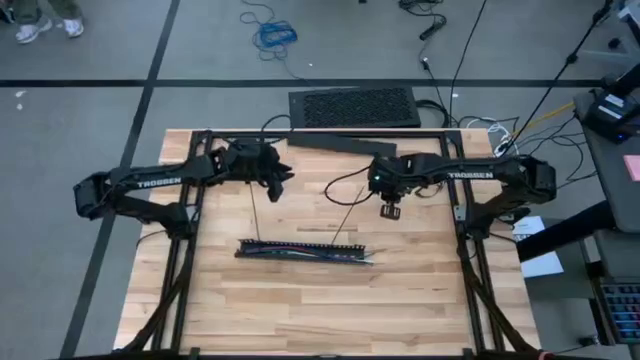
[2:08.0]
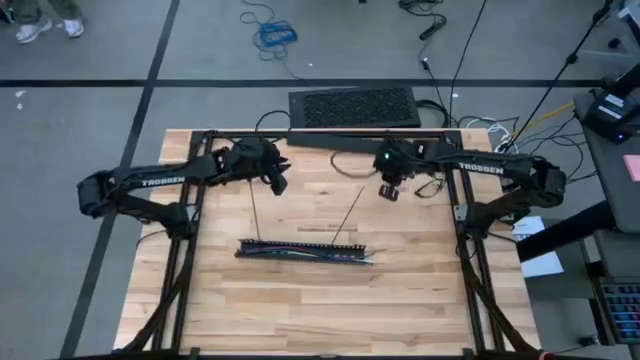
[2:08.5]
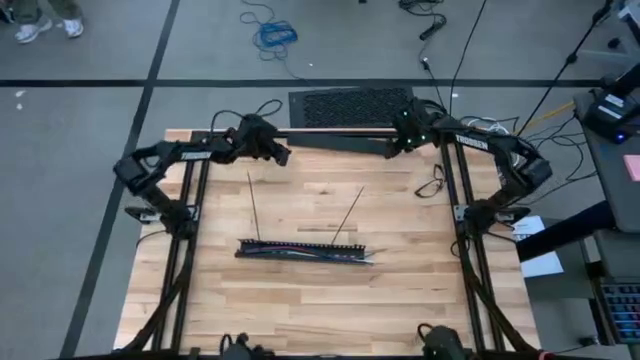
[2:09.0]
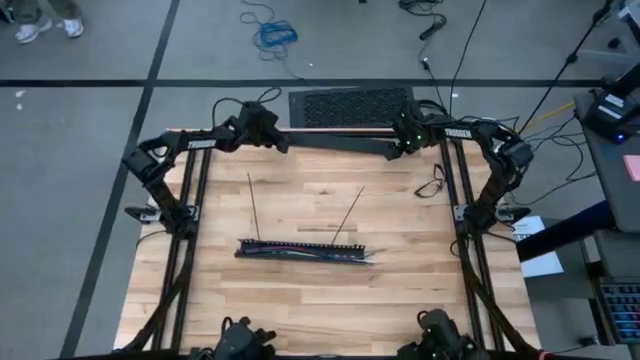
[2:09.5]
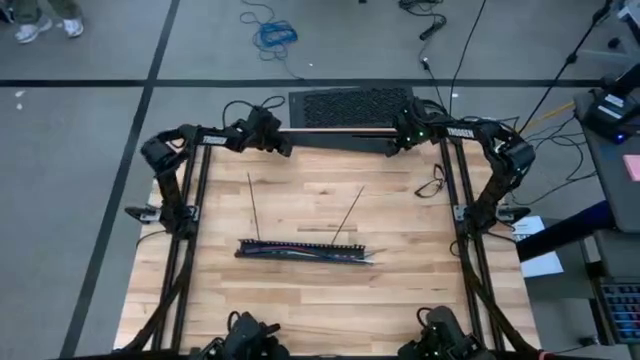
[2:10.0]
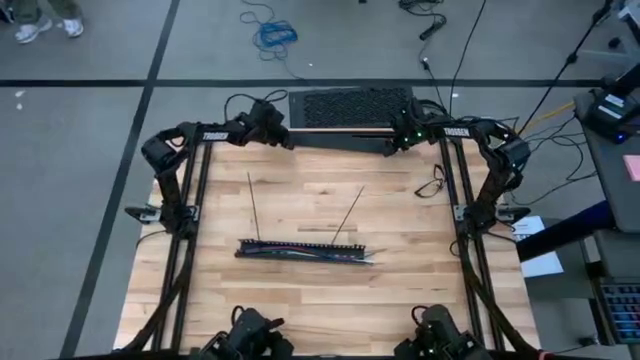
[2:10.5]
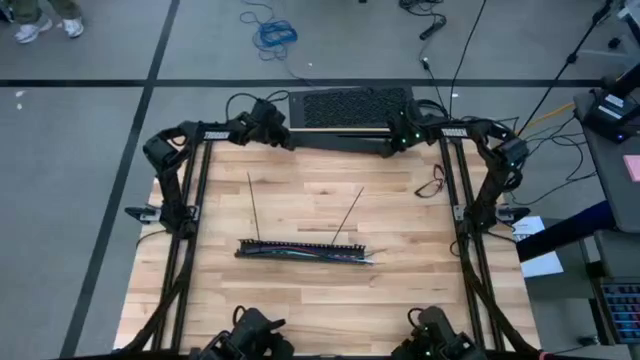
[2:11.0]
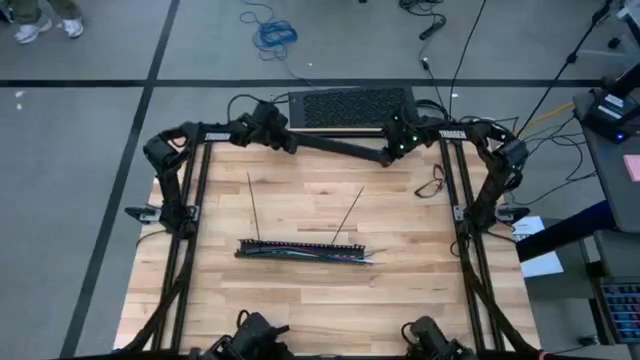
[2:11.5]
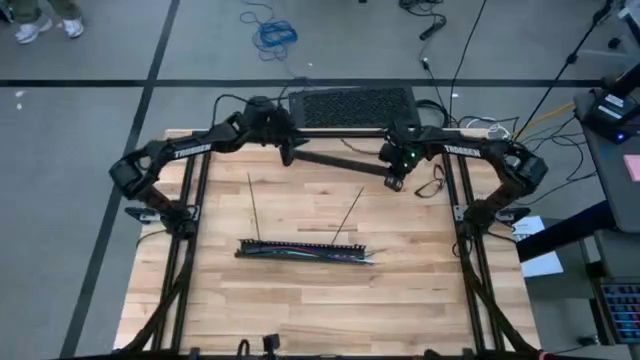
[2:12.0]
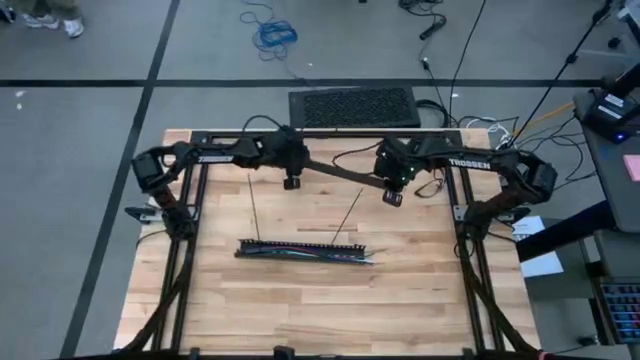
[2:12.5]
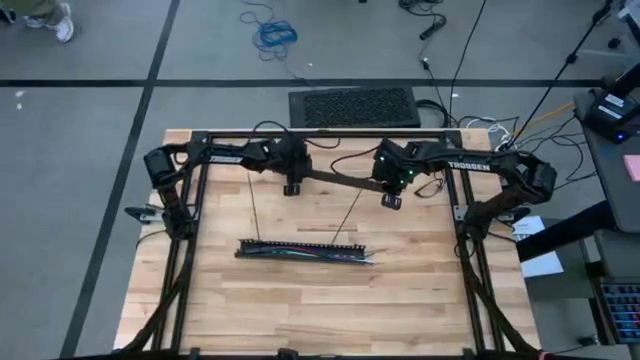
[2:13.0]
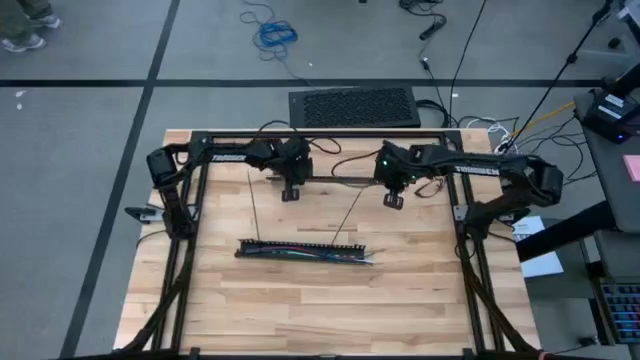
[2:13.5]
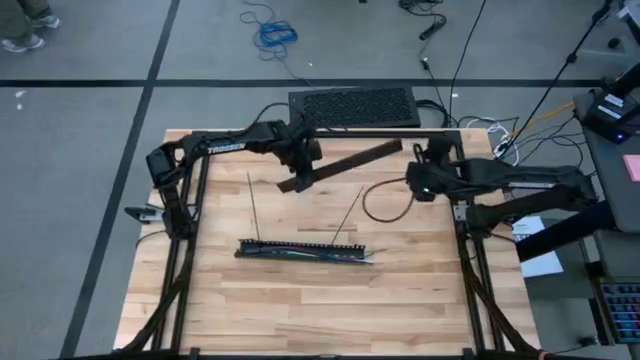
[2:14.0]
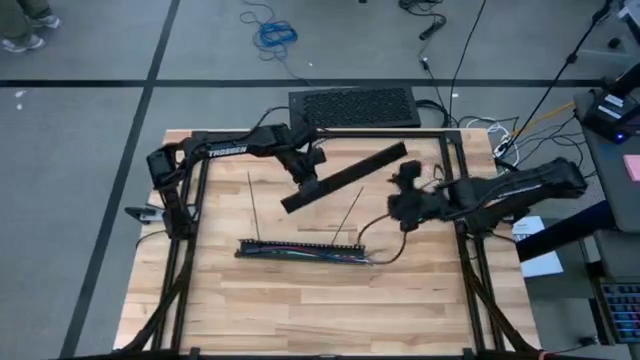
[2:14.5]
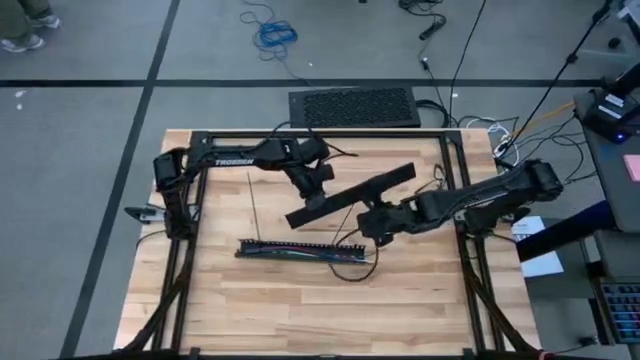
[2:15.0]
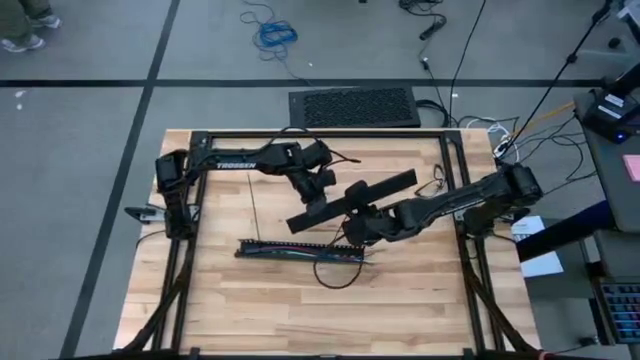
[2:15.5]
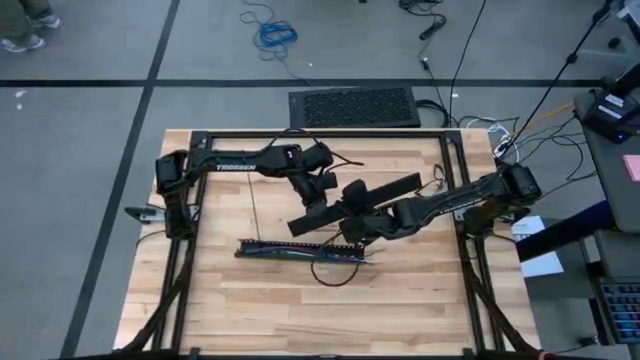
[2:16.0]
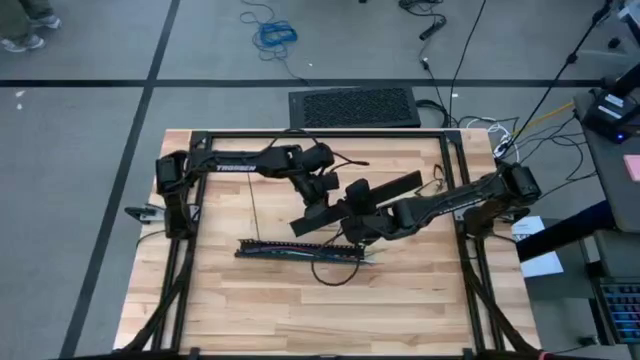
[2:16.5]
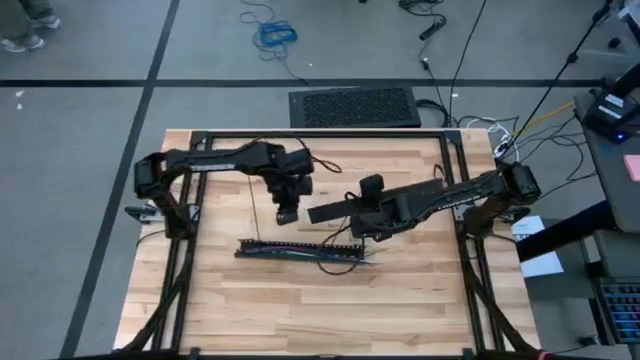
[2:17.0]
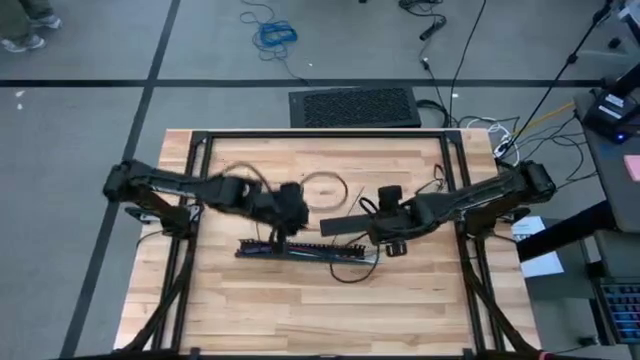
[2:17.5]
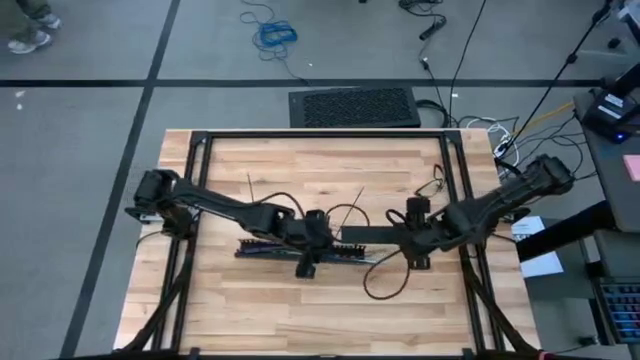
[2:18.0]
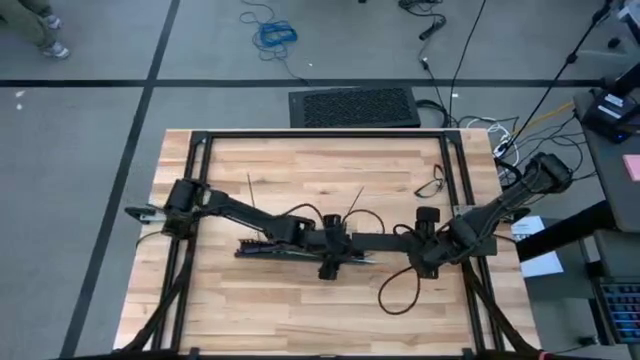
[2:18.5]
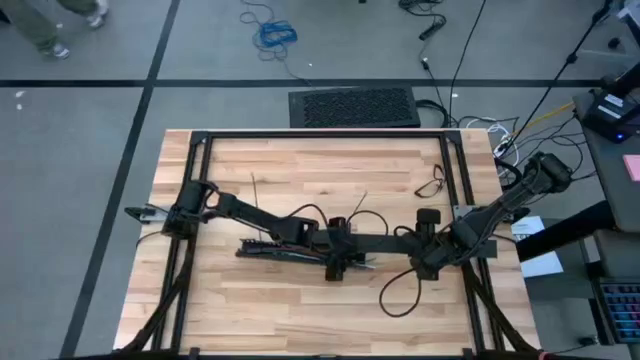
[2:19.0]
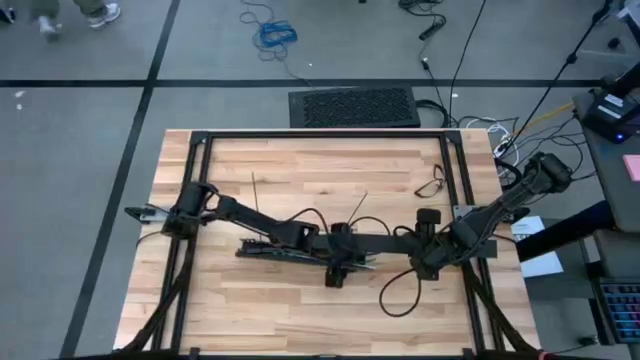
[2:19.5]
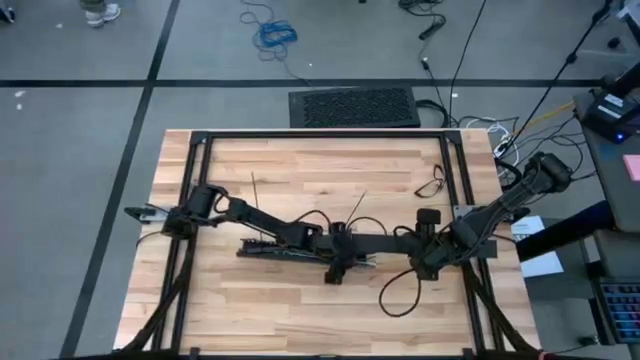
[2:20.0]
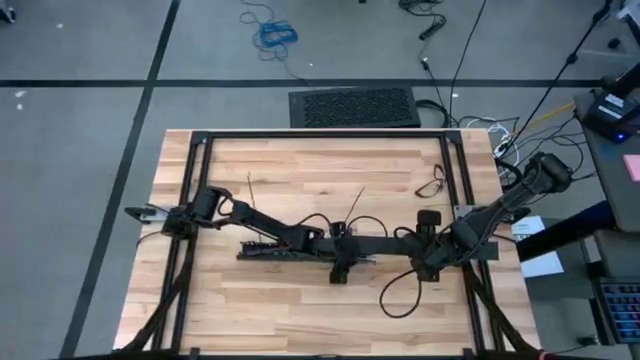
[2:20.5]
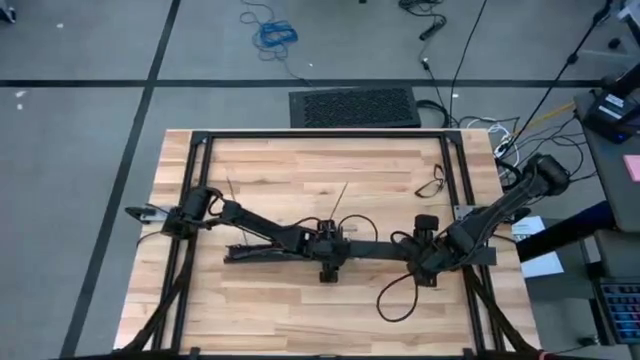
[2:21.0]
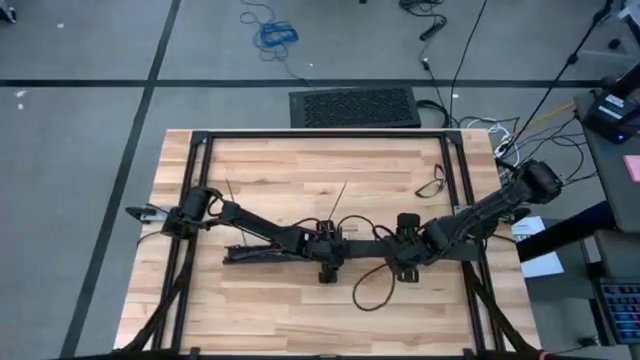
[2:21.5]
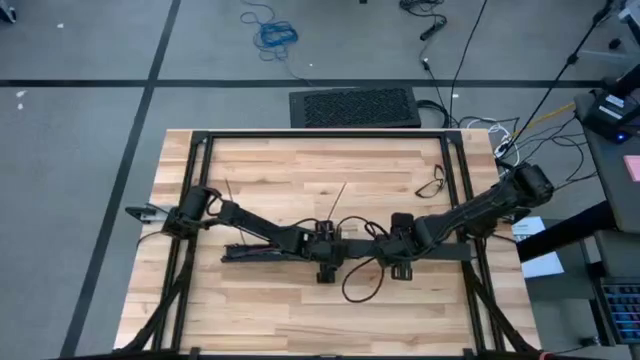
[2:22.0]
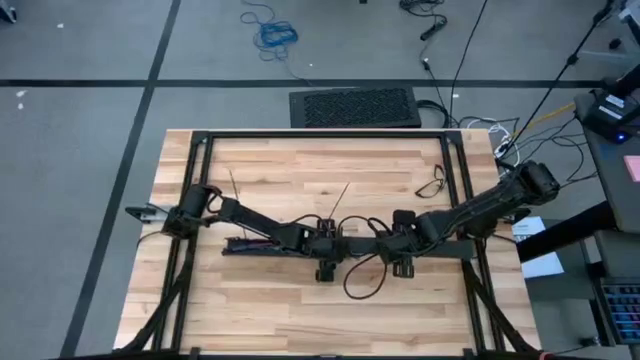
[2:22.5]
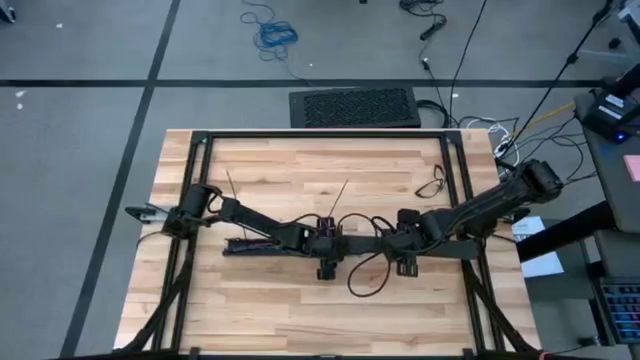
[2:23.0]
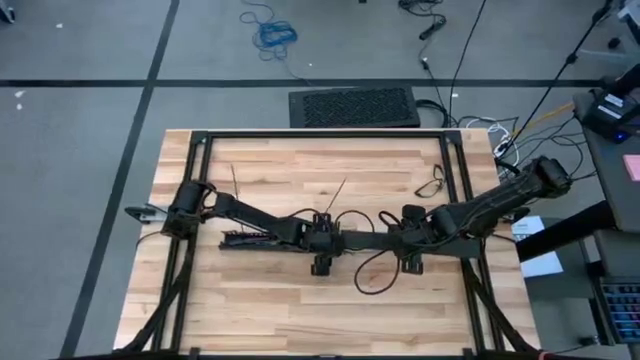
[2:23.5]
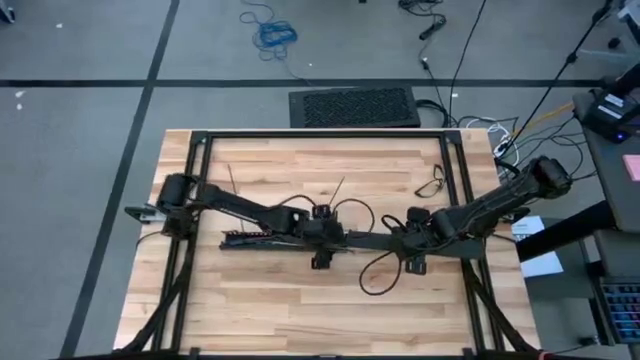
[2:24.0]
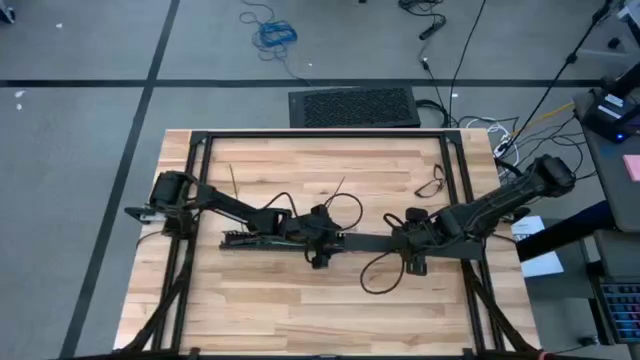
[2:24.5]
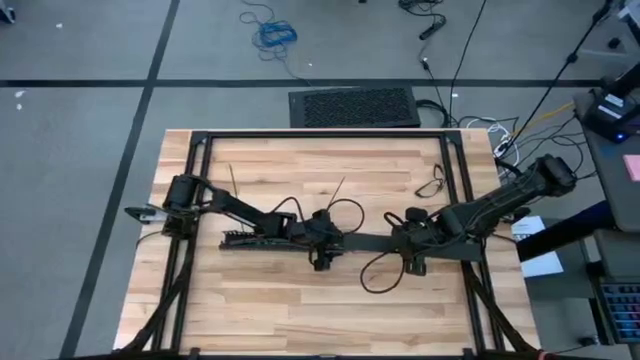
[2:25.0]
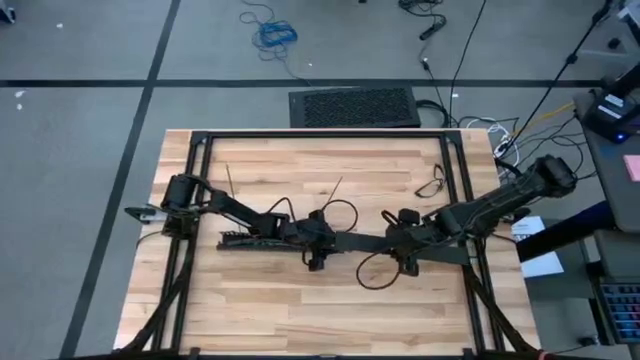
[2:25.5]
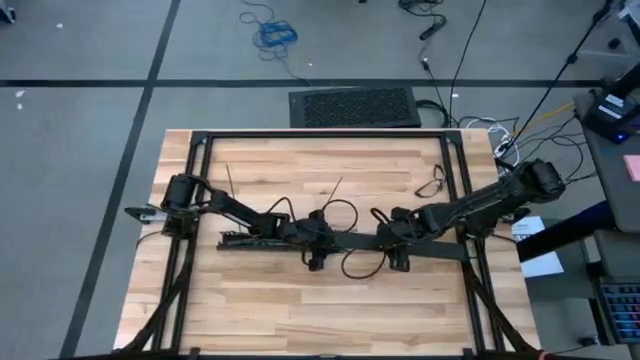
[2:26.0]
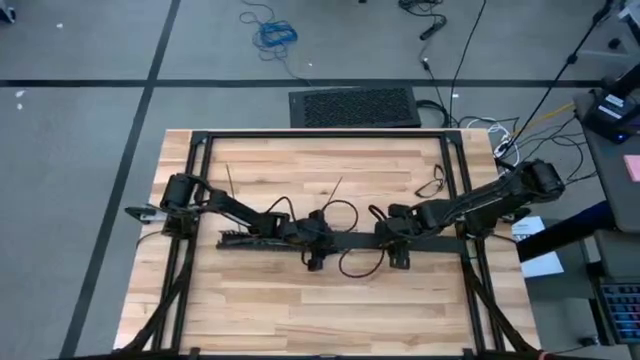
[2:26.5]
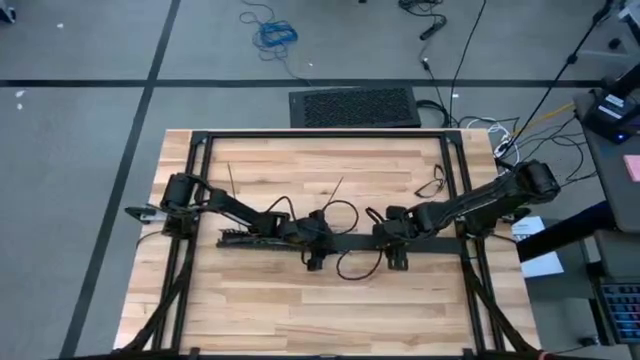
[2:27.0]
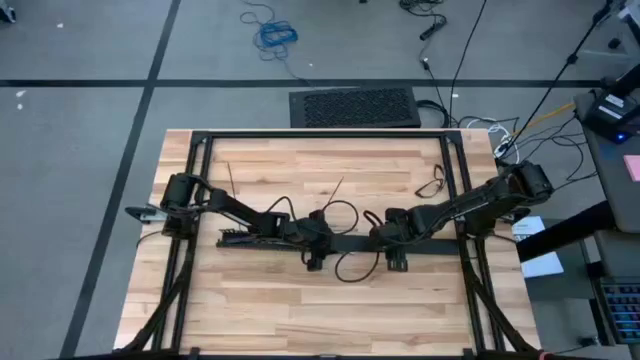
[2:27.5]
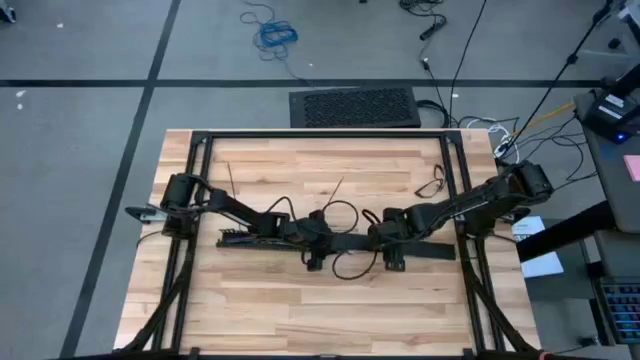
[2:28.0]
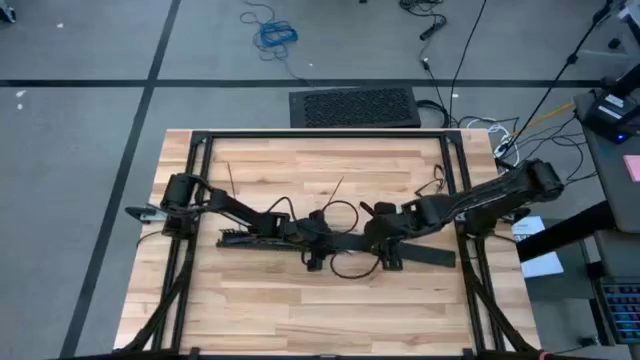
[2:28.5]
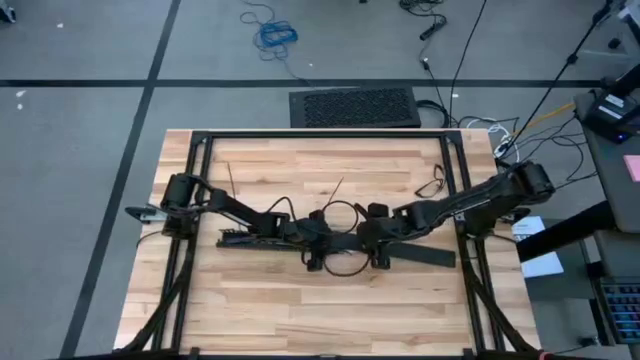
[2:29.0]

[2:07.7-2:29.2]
Task: Ziptie cables
Close the black cable duct
